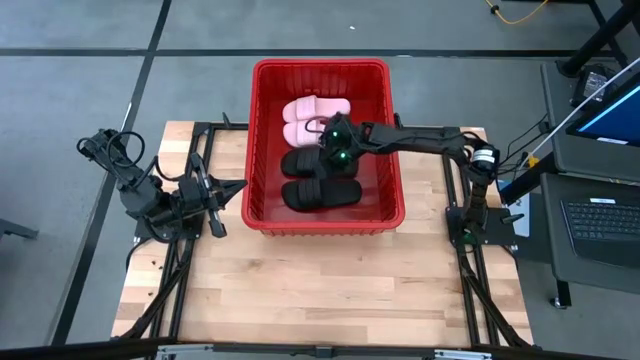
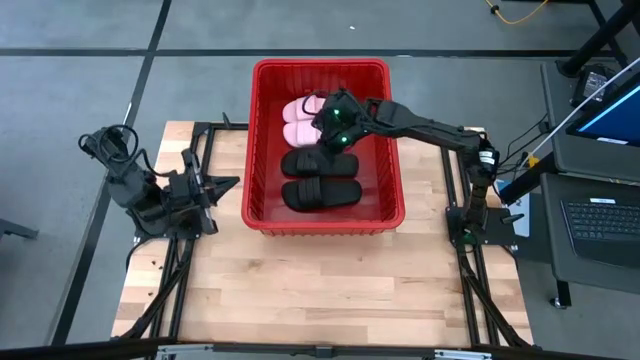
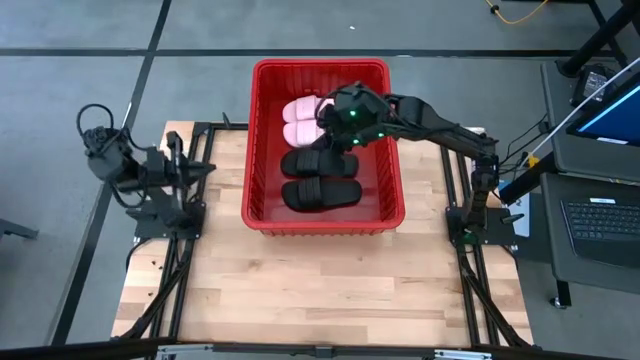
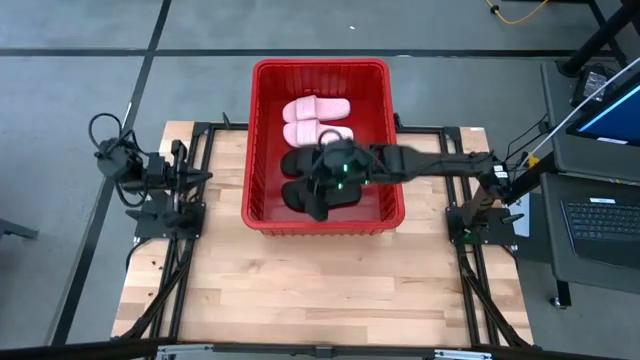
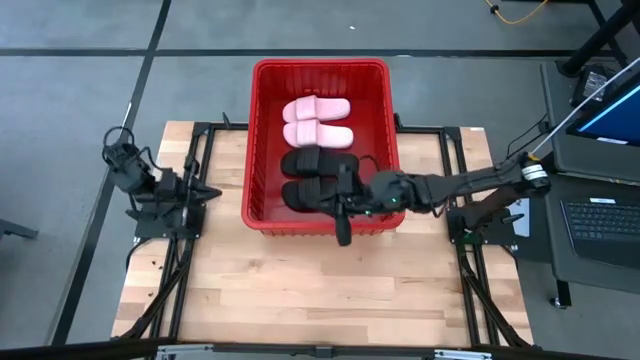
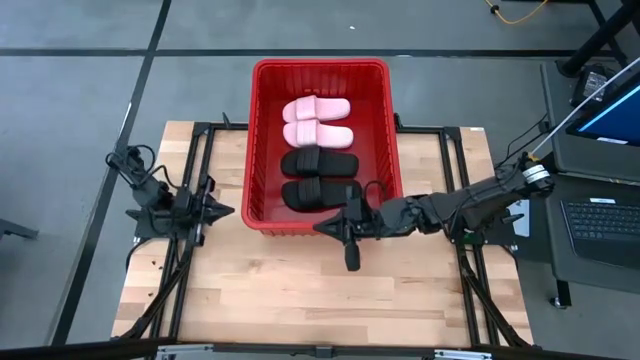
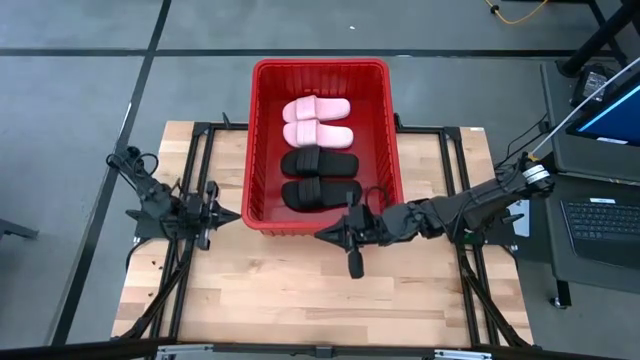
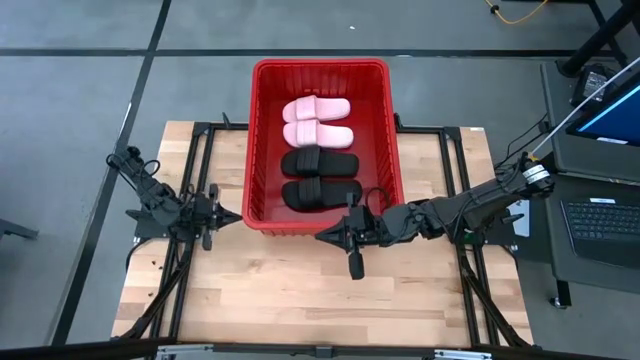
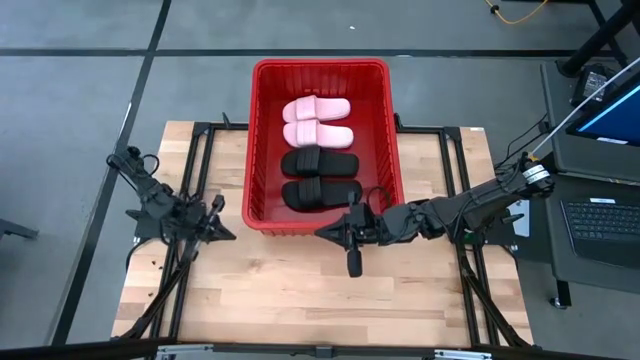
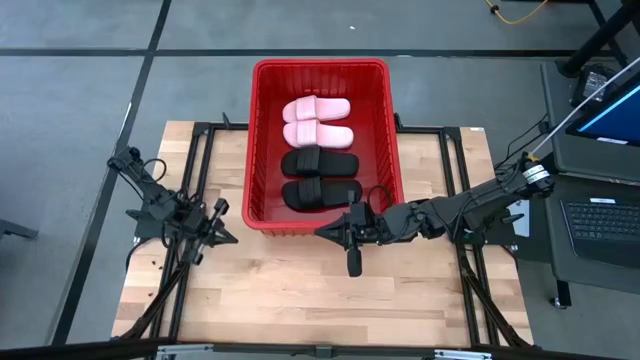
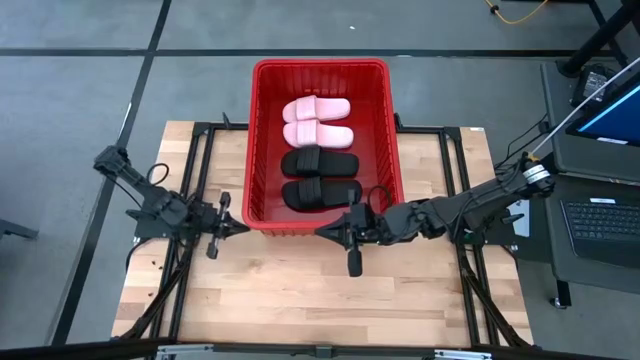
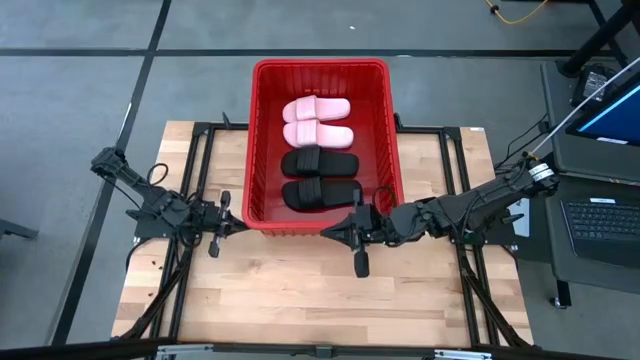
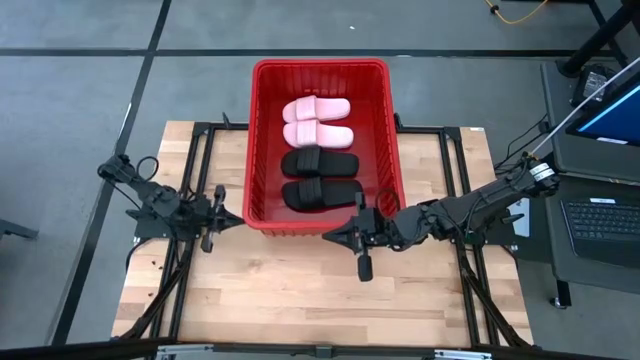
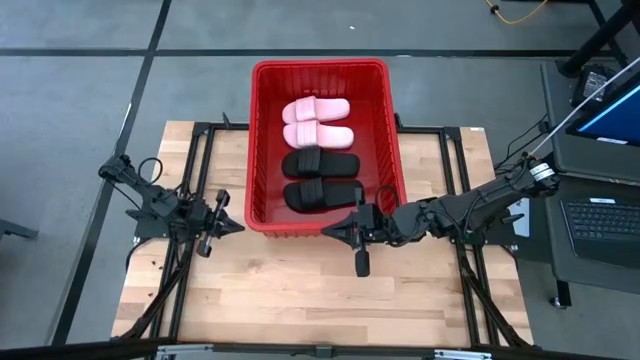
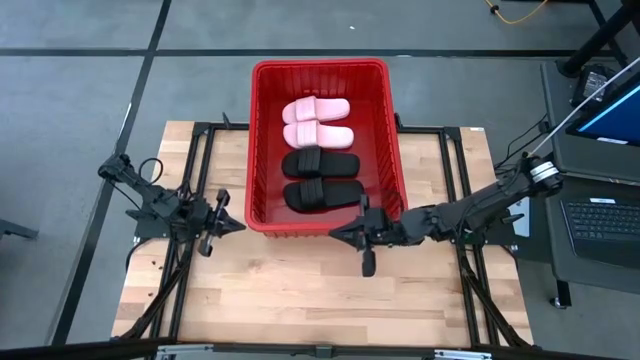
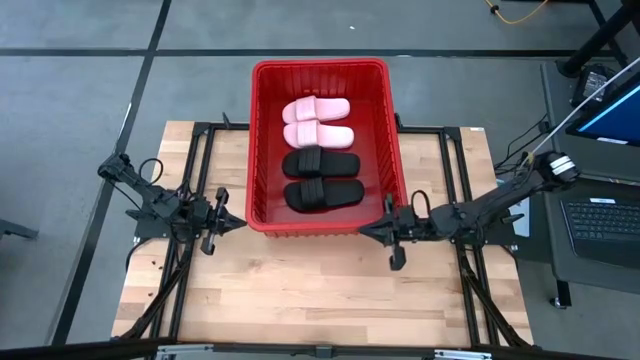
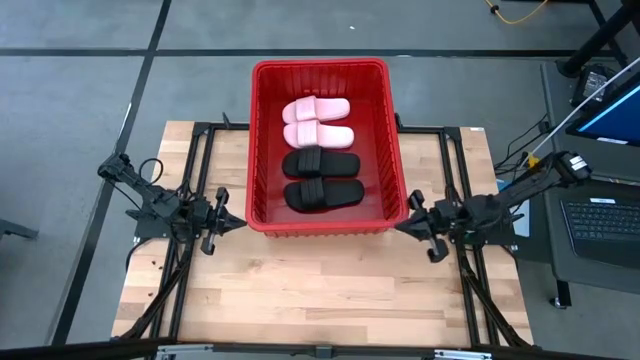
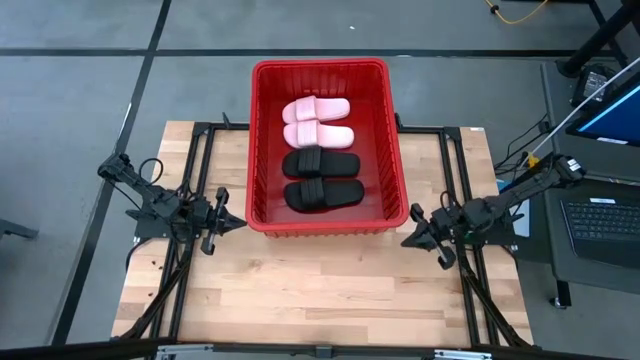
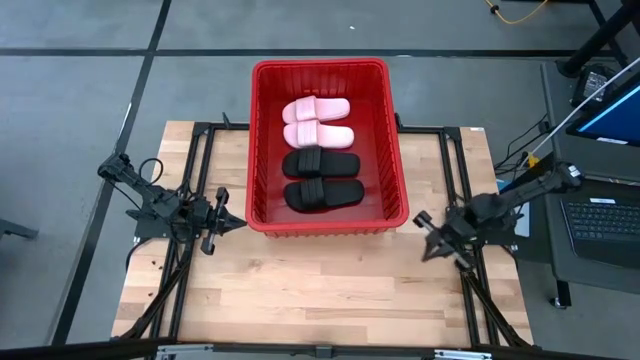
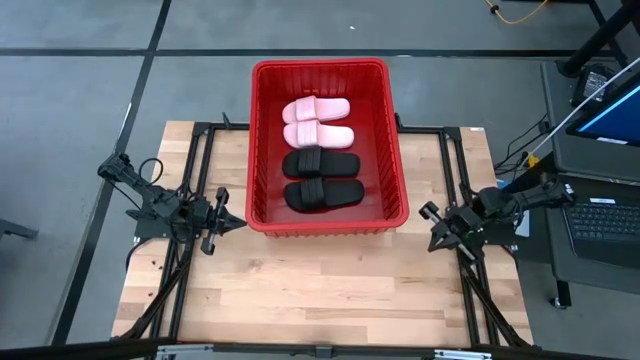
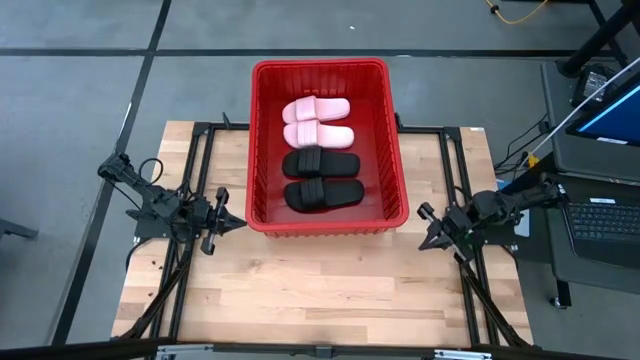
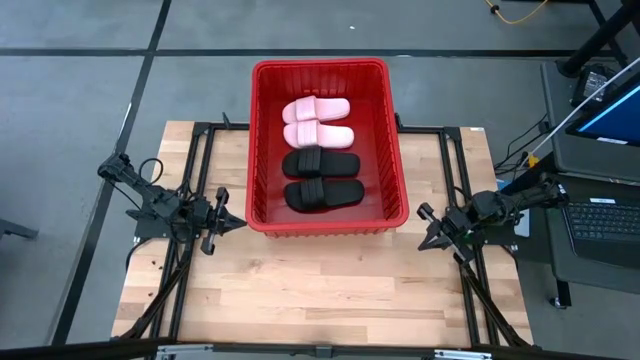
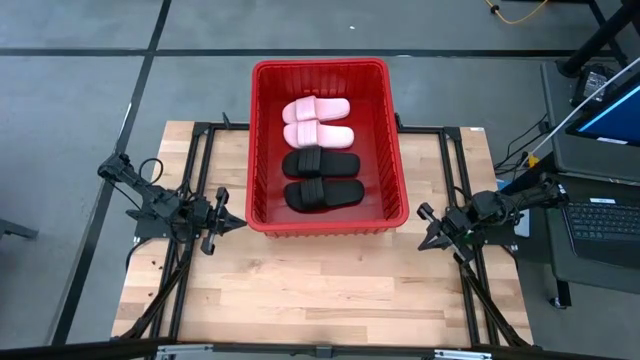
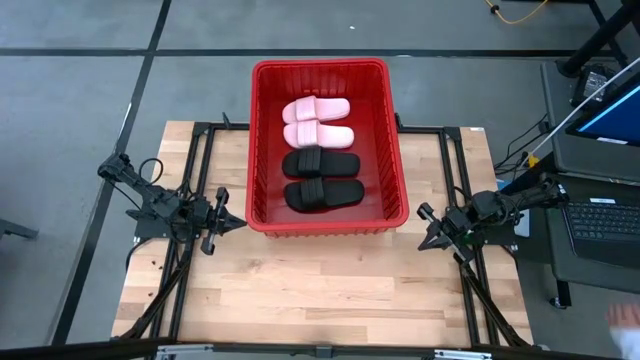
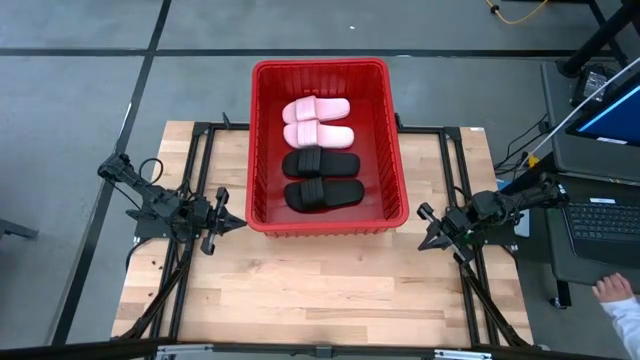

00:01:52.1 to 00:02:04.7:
Task: Pick and place slides into bin
Return to Home Position

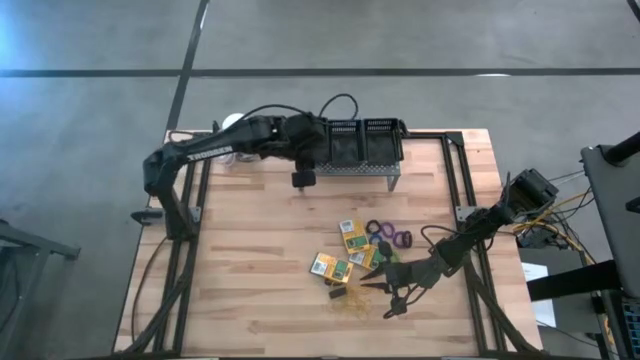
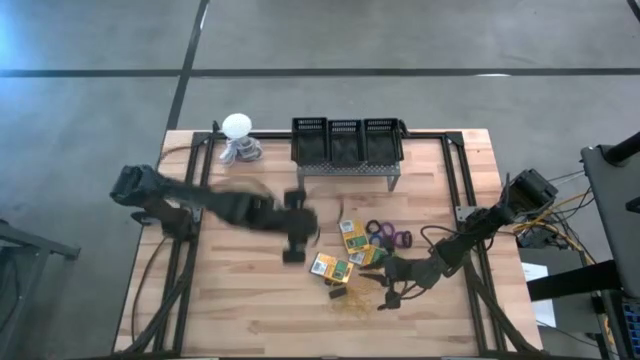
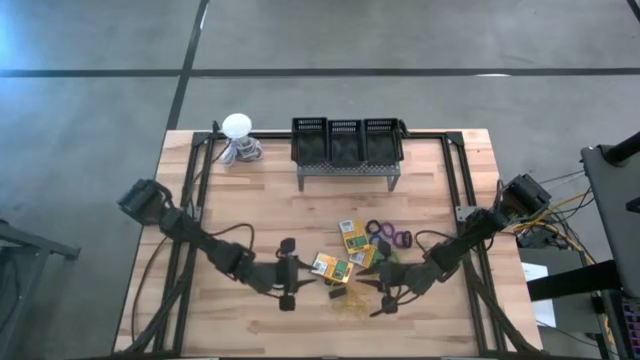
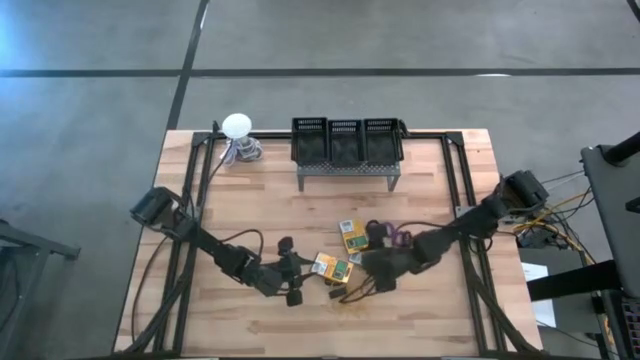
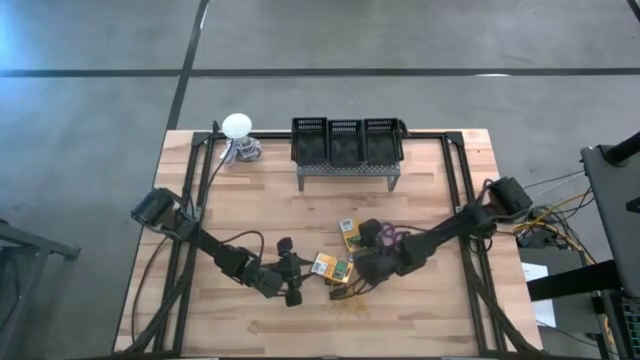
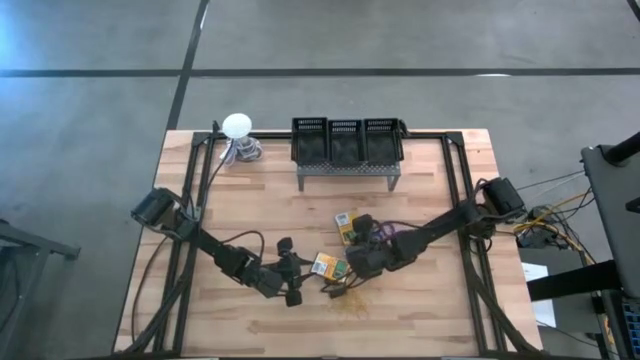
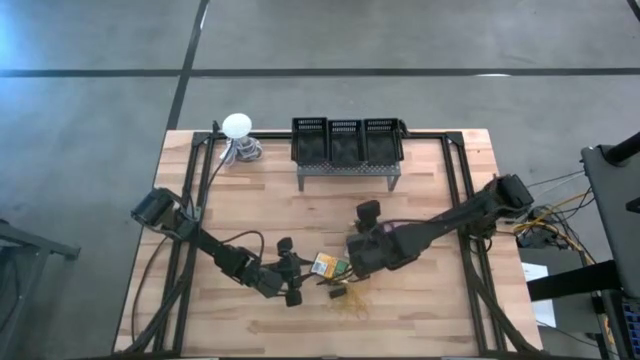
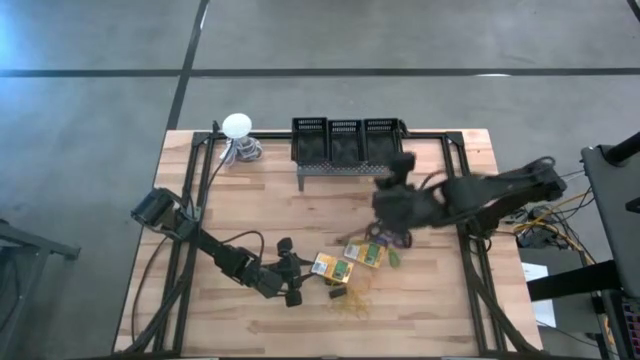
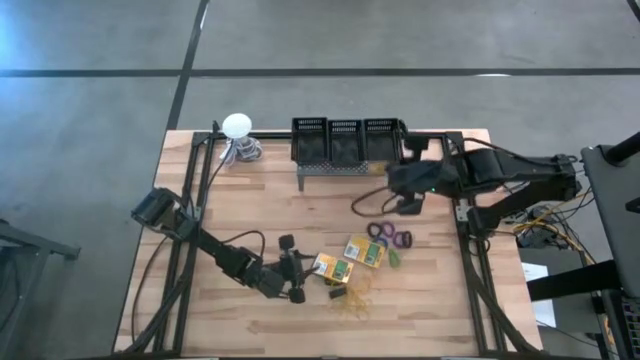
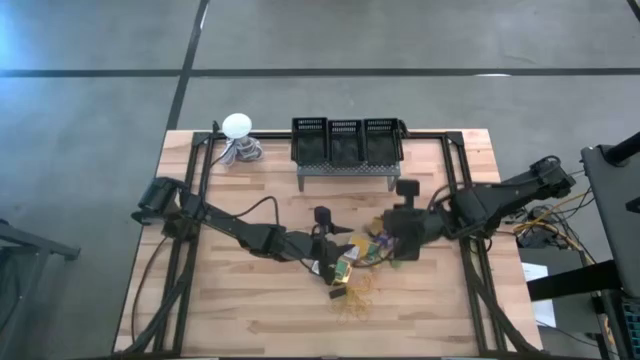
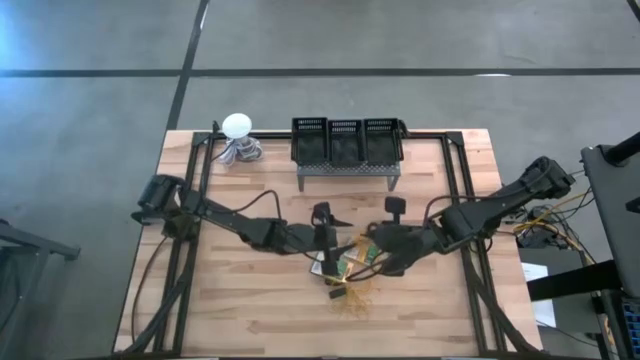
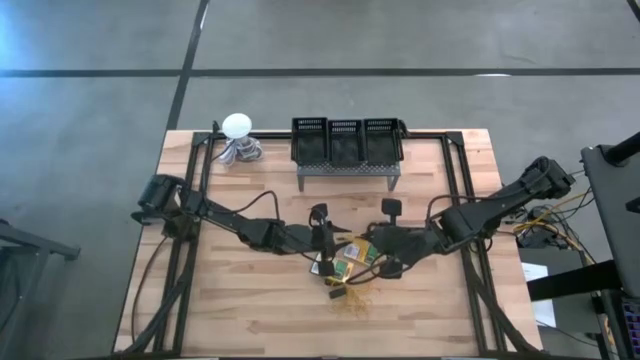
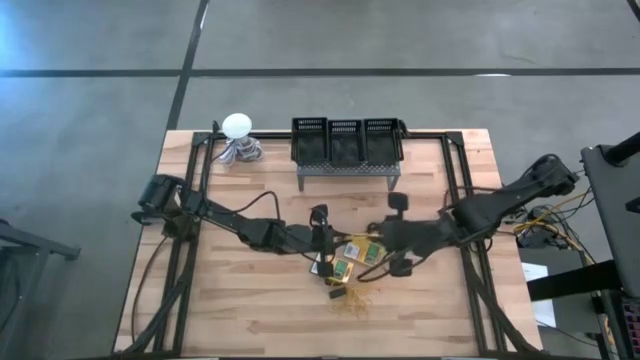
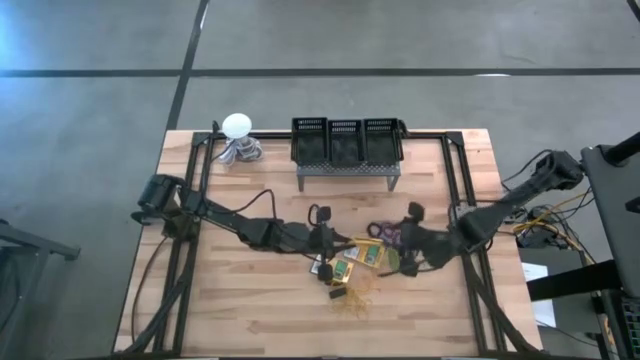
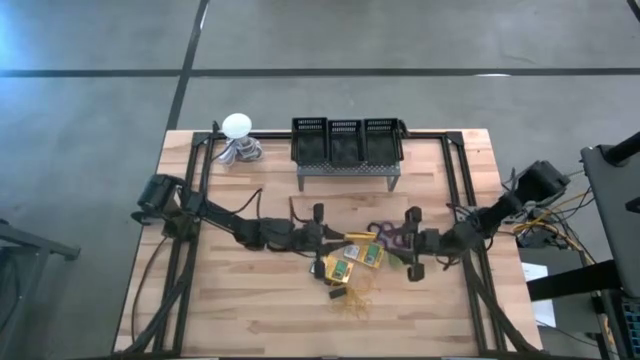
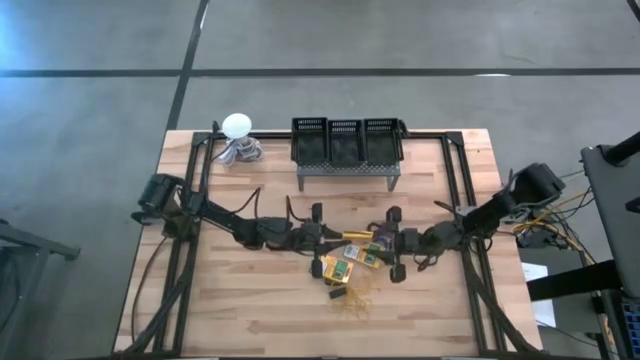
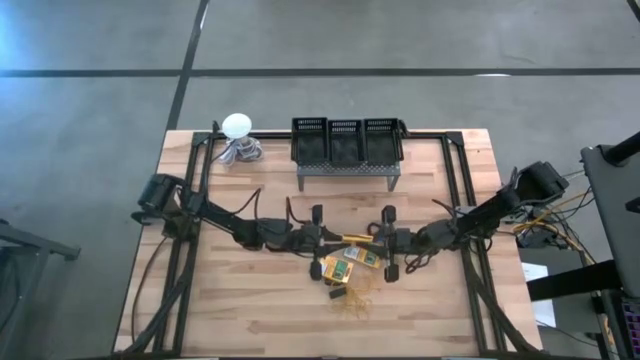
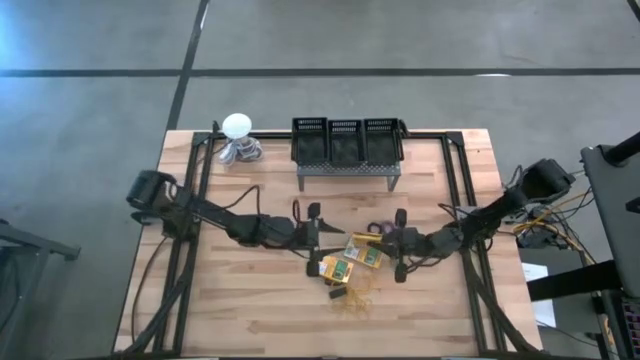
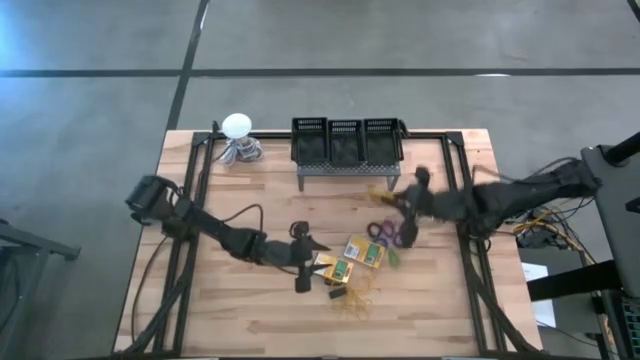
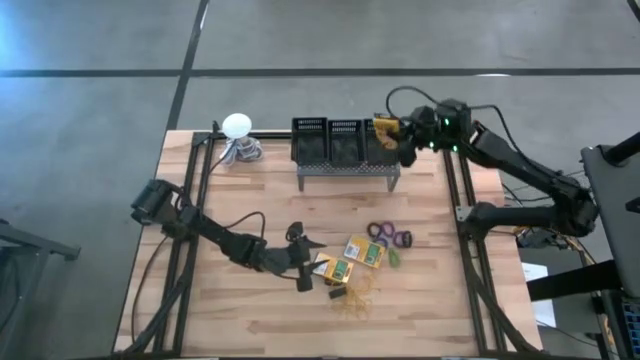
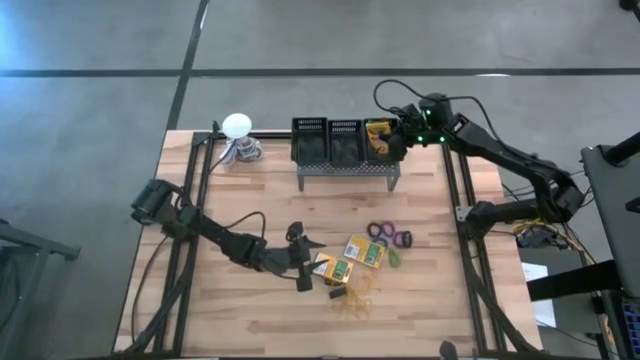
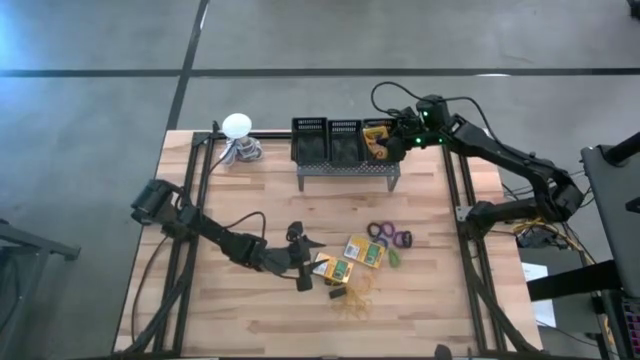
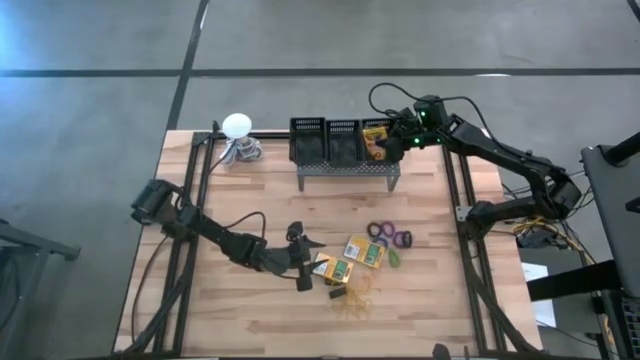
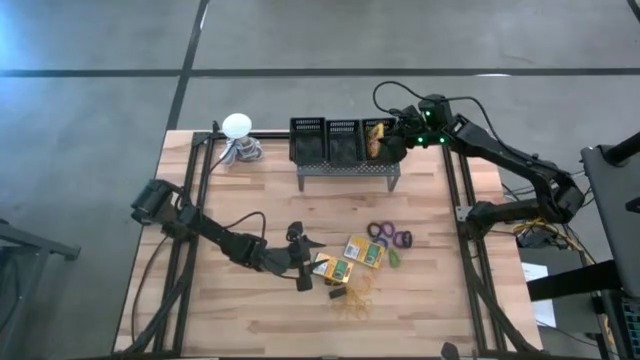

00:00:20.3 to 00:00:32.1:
Task: Pick & Place Office Desk Supplies
Put the yellow crayon box into the right black bin on the shelf
